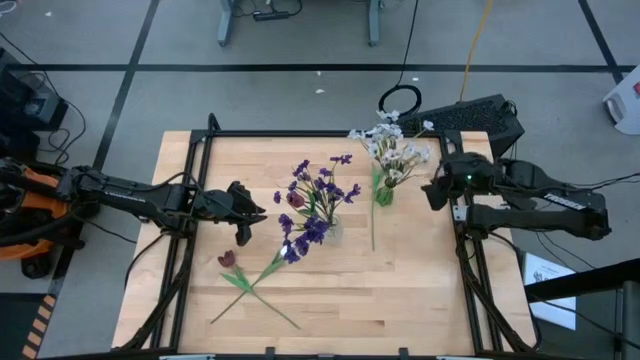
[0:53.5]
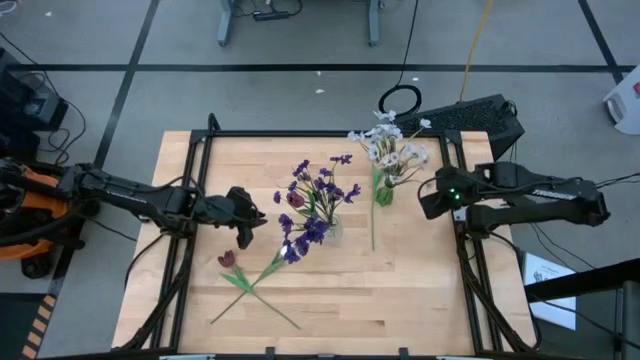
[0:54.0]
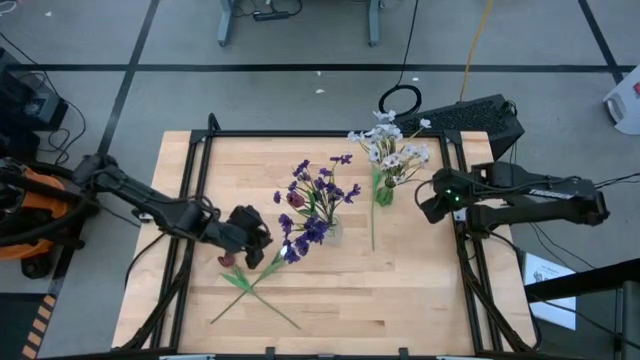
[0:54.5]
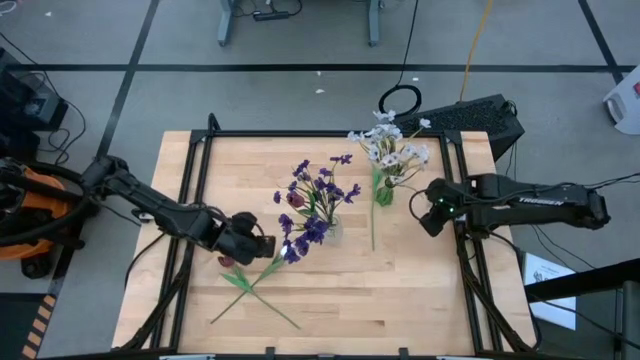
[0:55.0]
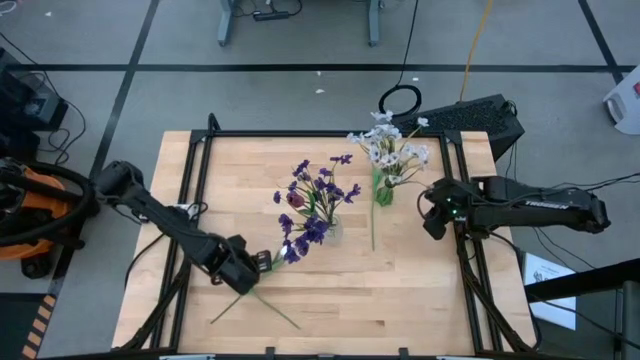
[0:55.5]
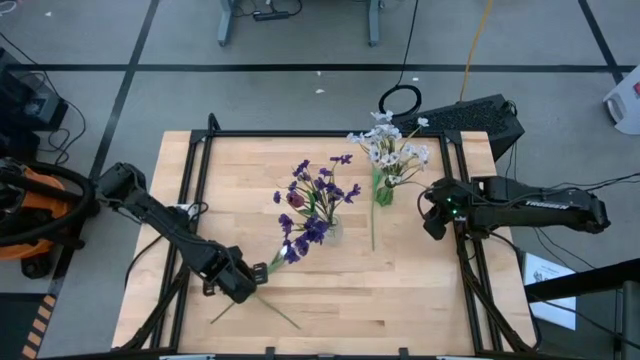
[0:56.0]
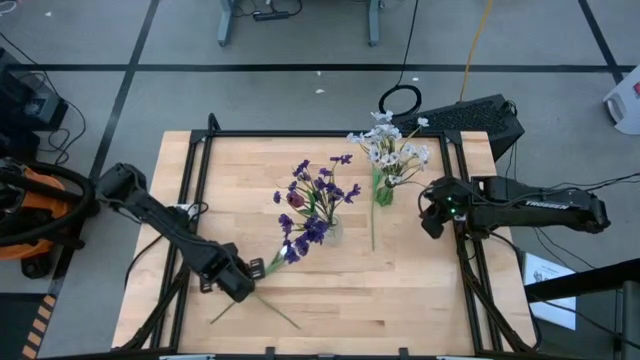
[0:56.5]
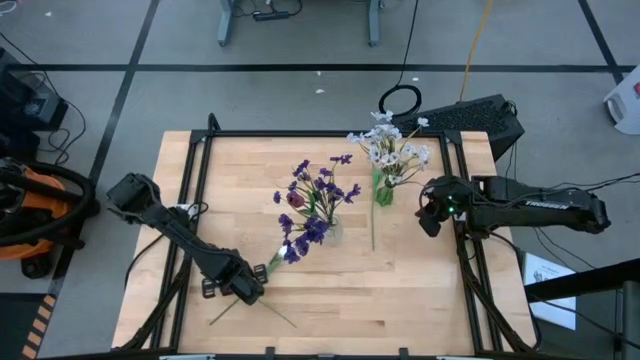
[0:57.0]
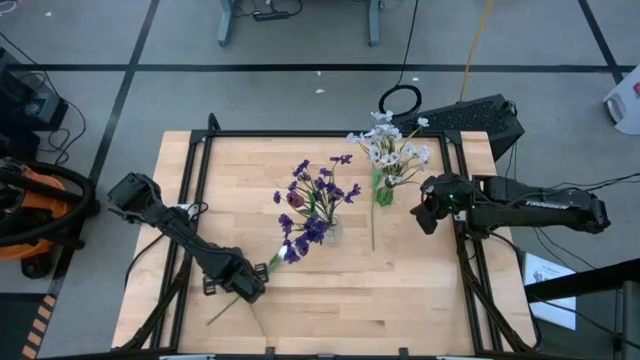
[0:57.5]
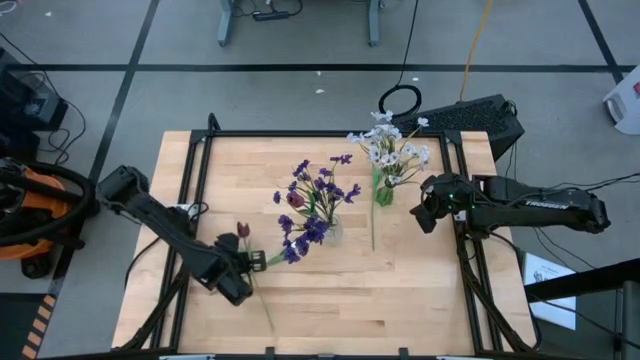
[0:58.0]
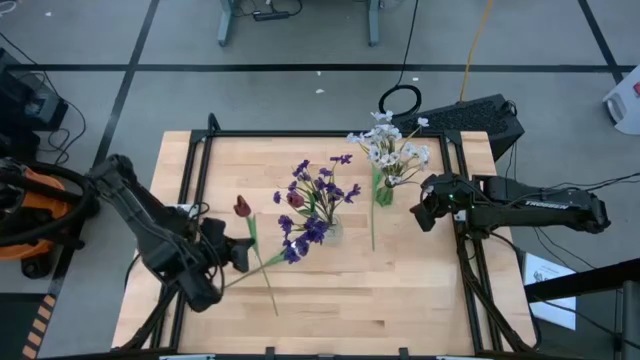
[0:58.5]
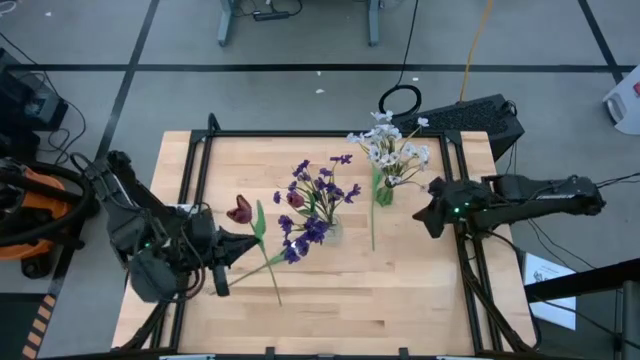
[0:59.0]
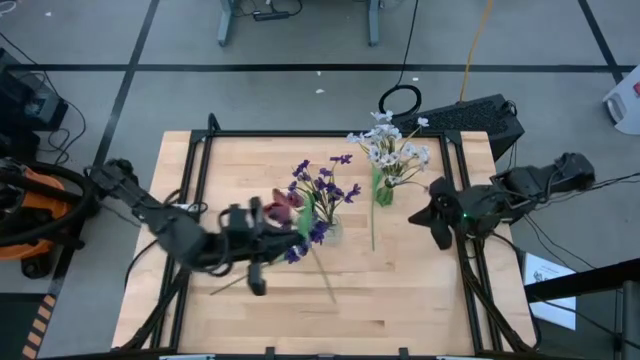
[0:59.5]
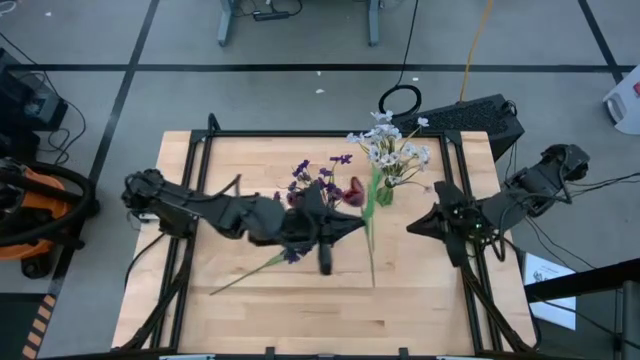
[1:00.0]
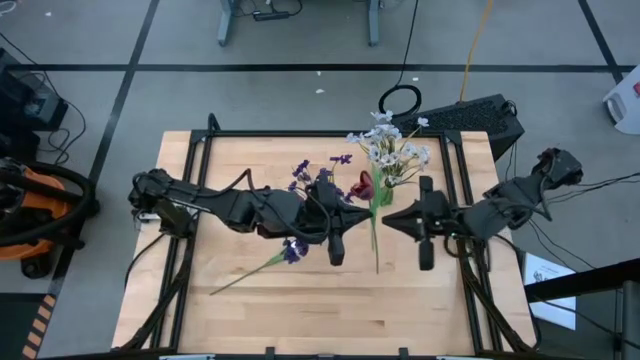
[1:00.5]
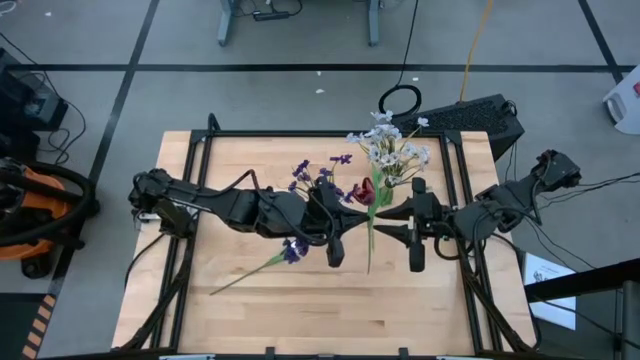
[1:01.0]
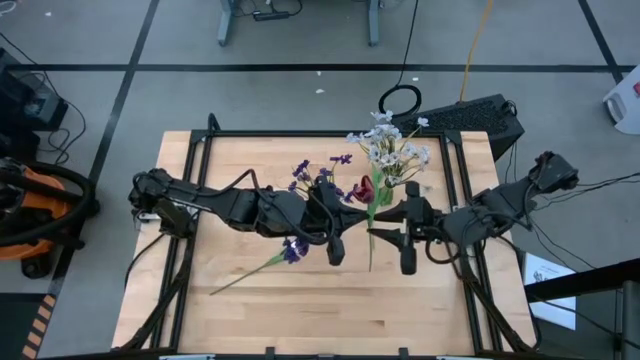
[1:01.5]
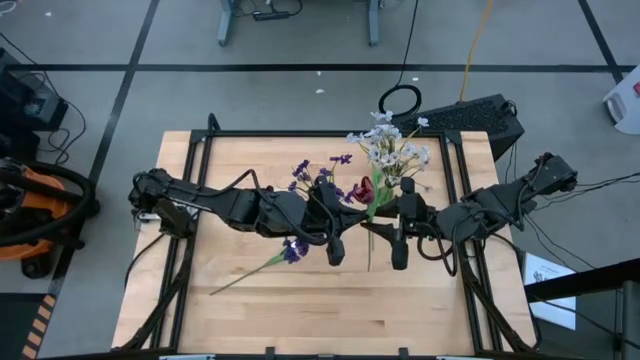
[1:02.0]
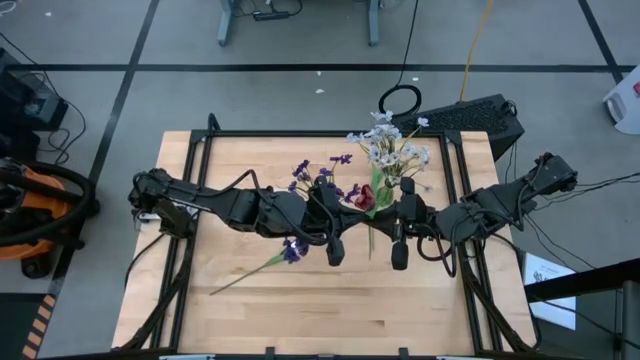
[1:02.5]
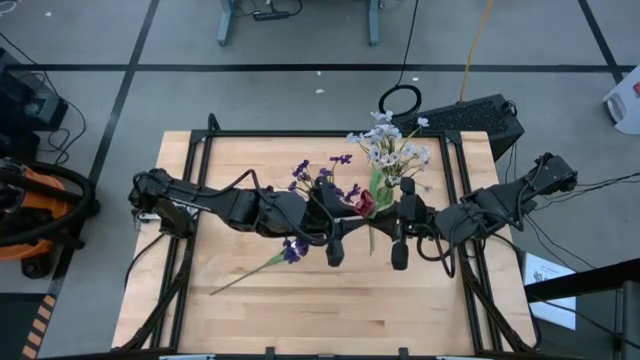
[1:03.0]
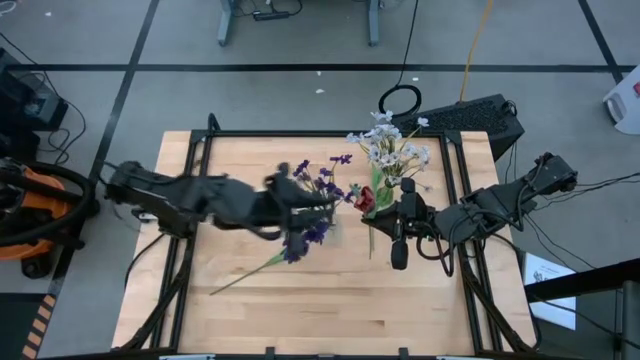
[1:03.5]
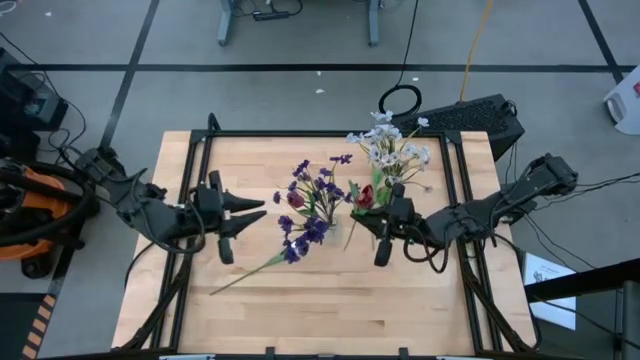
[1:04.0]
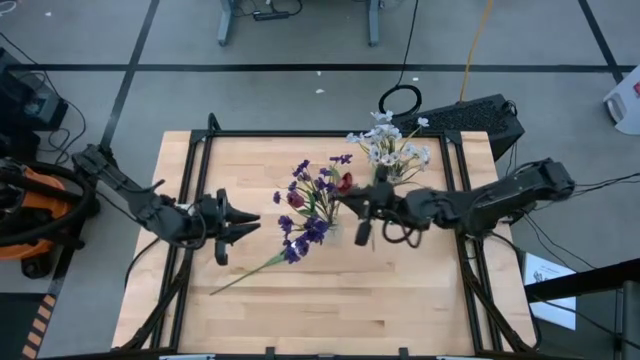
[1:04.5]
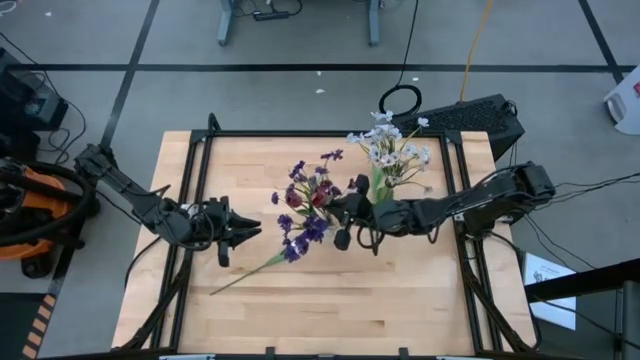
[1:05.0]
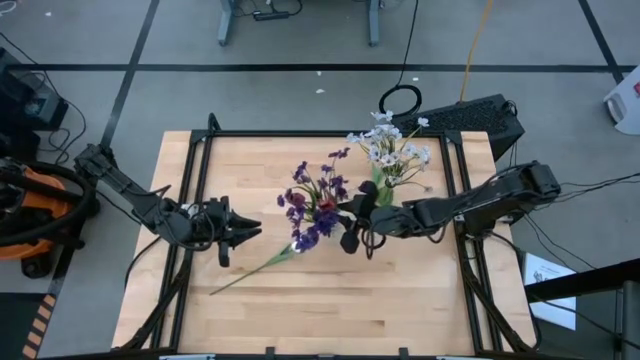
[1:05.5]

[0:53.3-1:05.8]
Task: Sort flowers into vase by color
Put the red tulip into the transparent vase

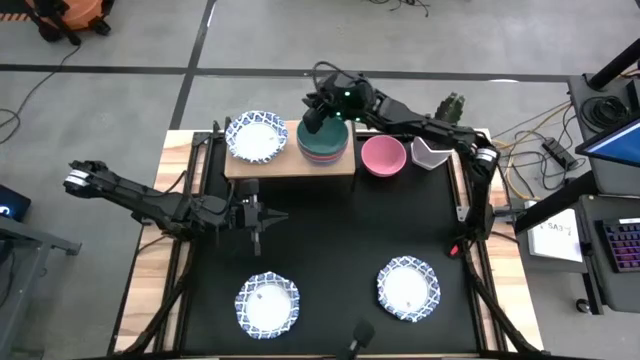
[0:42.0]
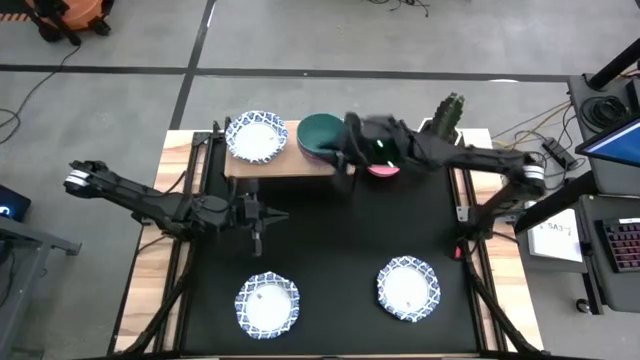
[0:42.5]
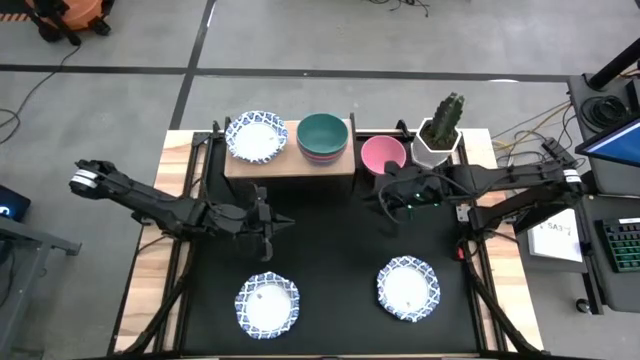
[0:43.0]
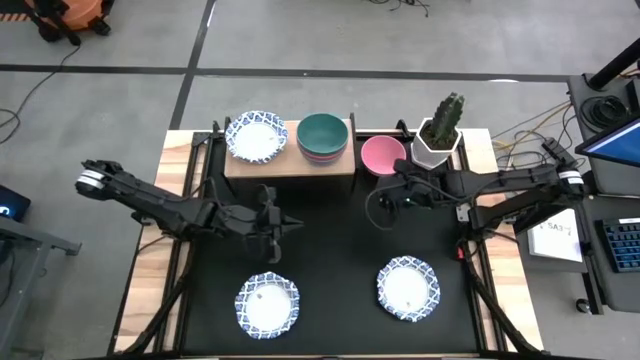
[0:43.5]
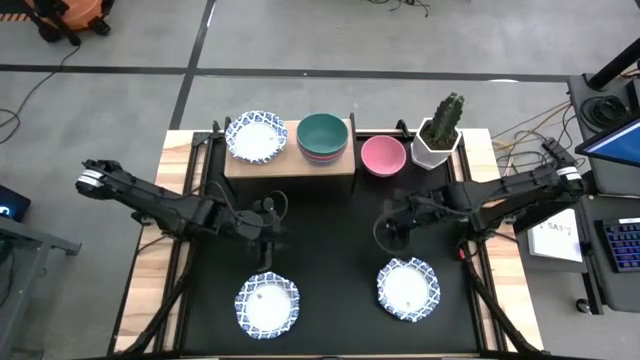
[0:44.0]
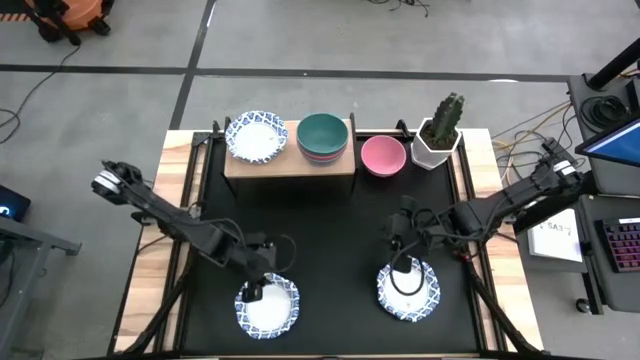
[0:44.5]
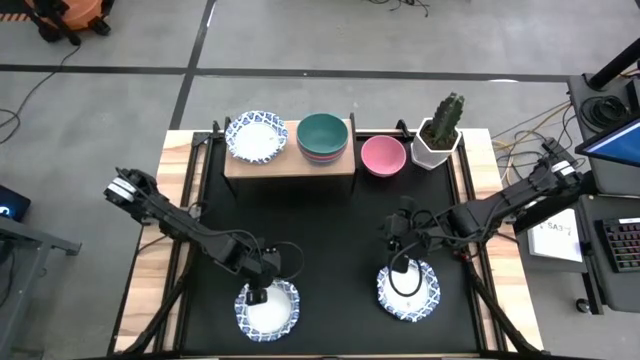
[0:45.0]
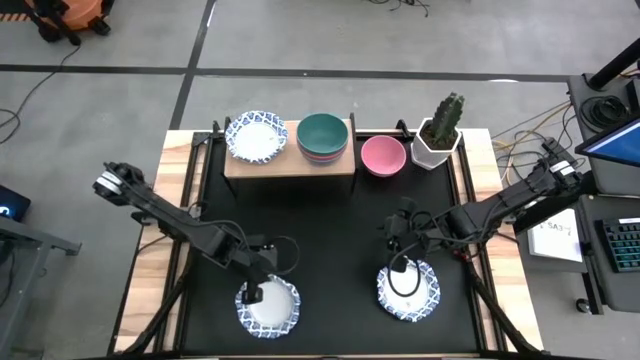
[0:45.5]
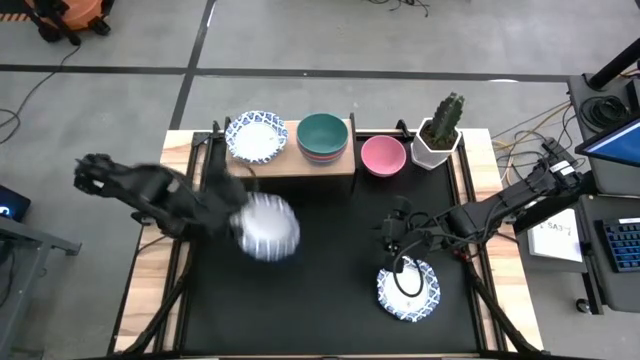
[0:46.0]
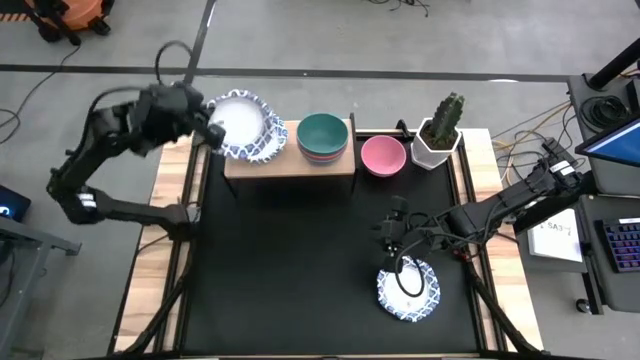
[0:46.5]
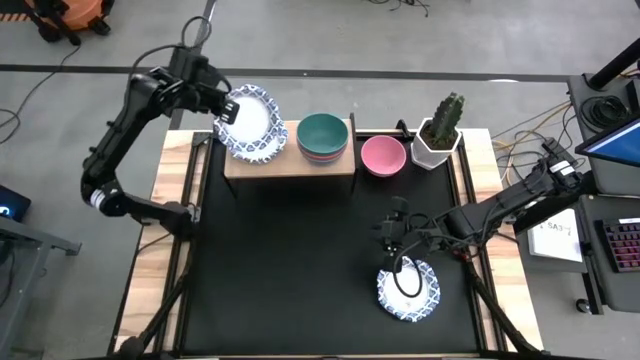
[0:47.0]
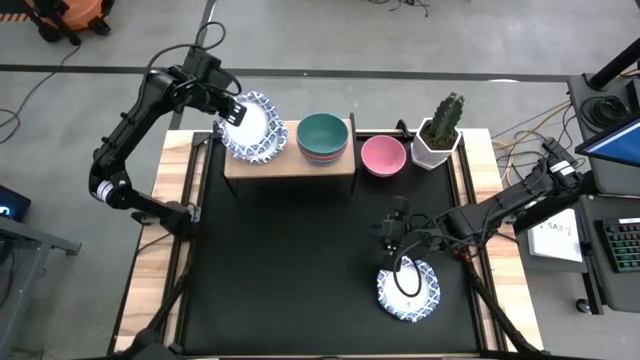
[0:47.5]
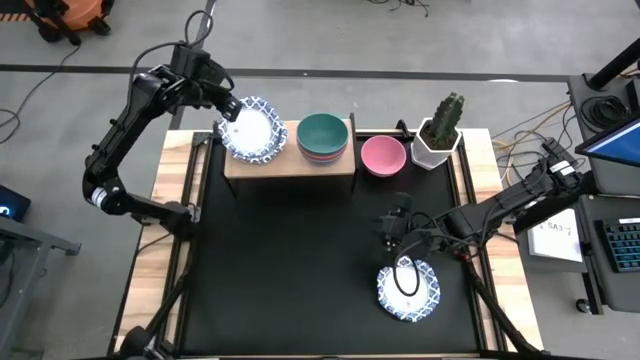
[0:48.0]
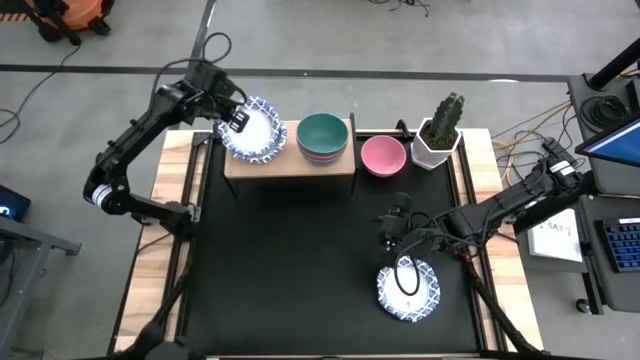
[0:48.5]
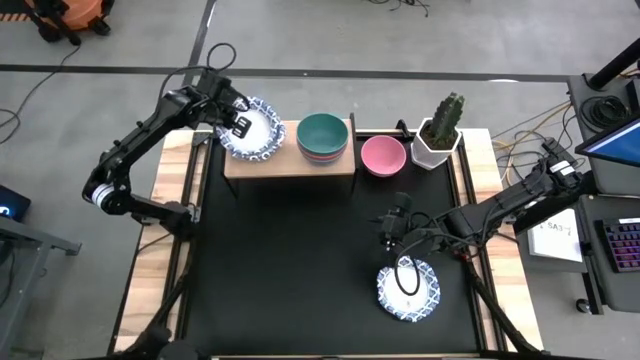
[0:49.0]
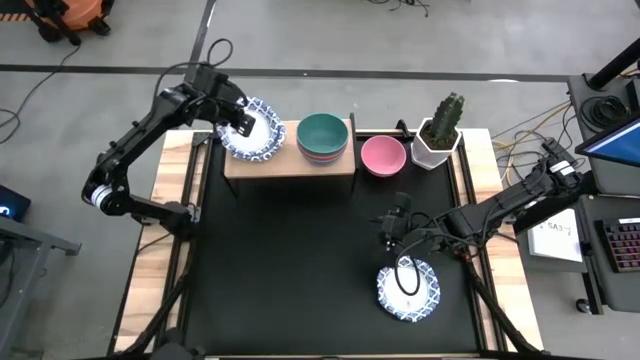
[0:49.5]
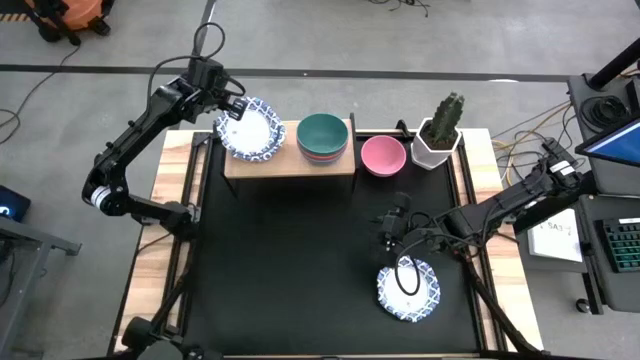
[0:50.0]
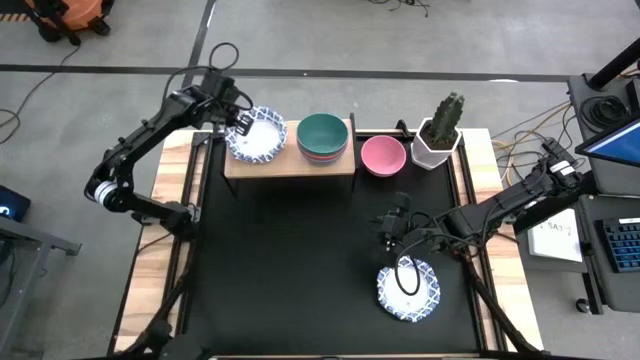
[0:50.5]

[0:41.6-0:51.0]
Task: Place and stack bowls onto a shelf
Stack the white patterned bowl on top of the white patterned bowl on the shelf
